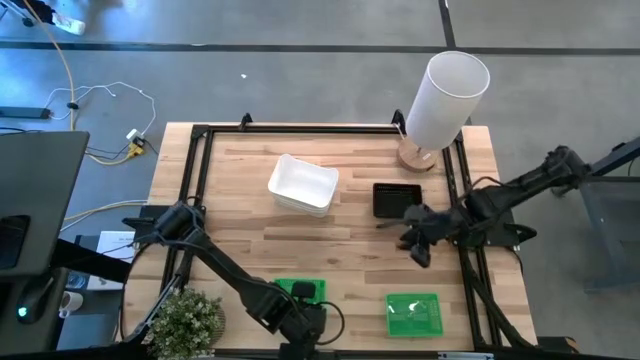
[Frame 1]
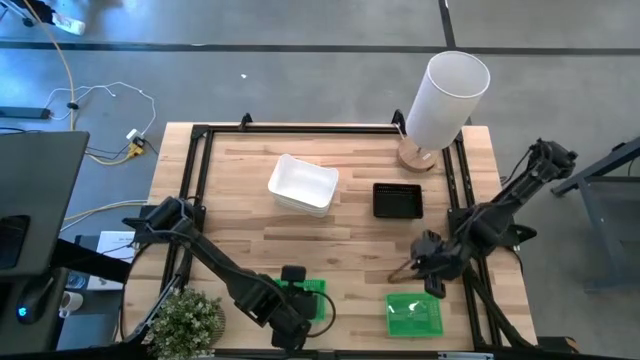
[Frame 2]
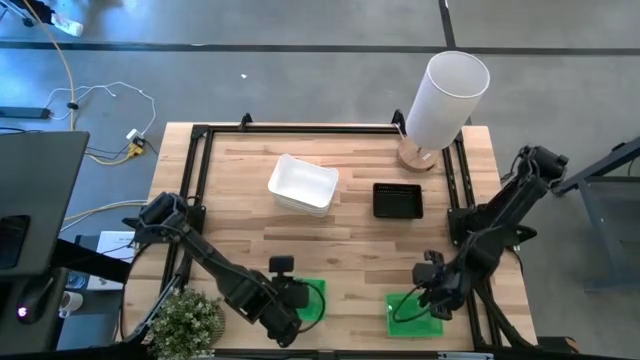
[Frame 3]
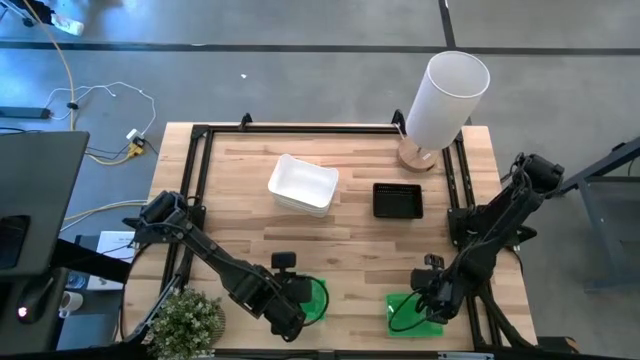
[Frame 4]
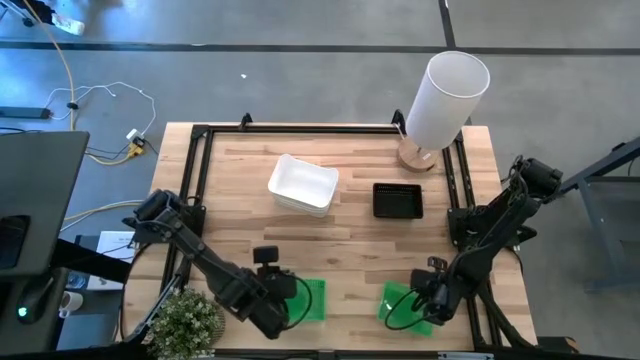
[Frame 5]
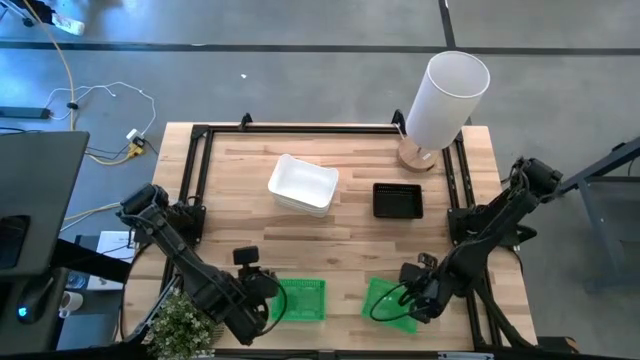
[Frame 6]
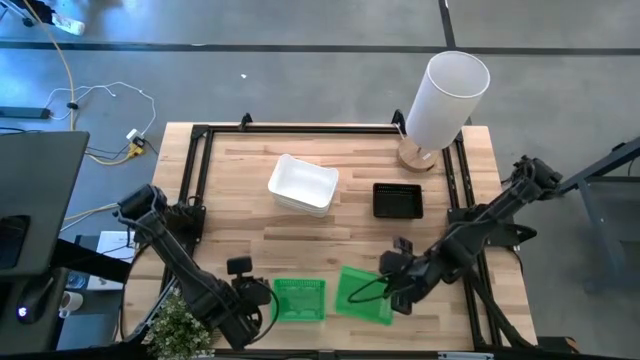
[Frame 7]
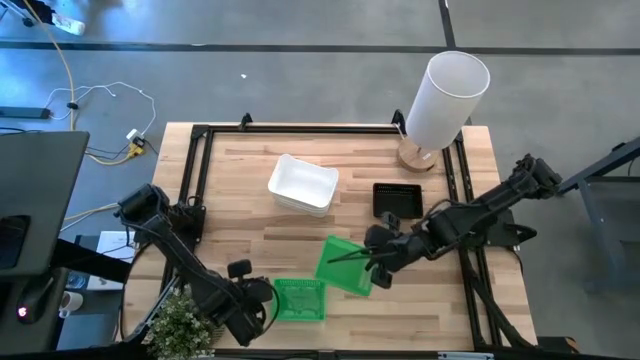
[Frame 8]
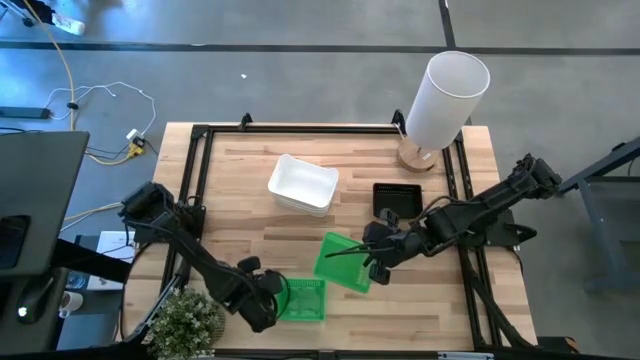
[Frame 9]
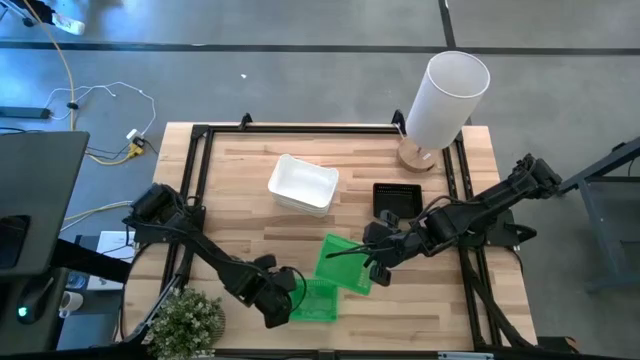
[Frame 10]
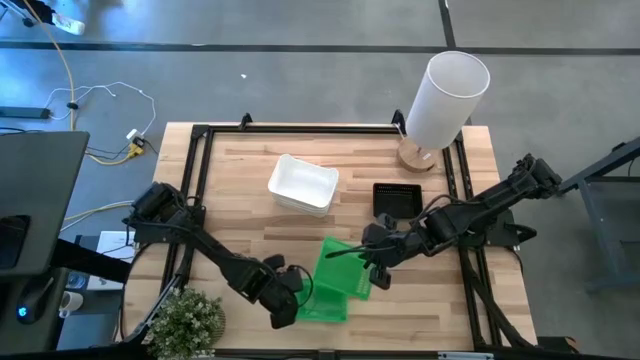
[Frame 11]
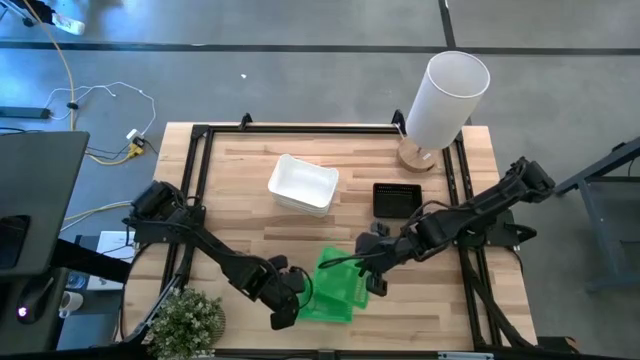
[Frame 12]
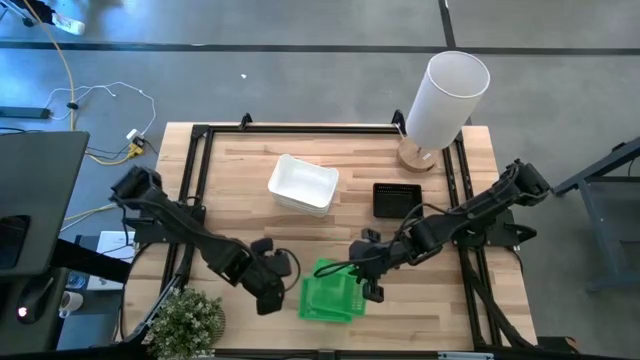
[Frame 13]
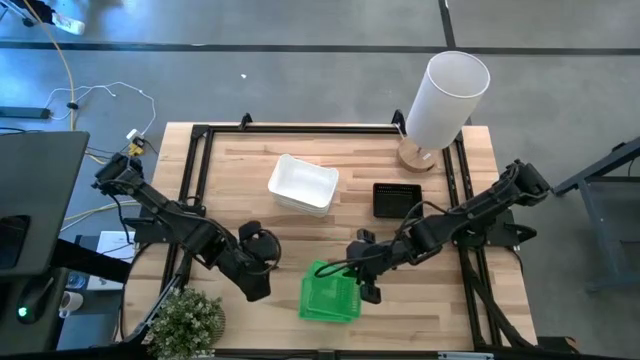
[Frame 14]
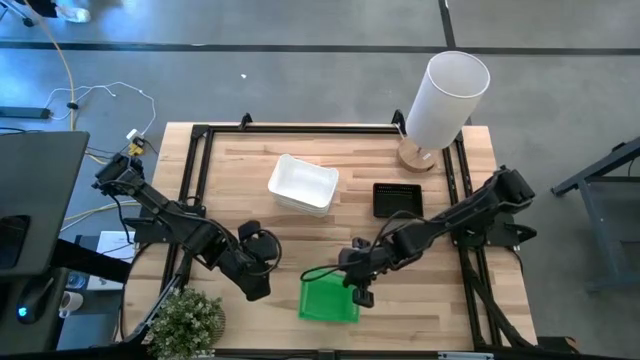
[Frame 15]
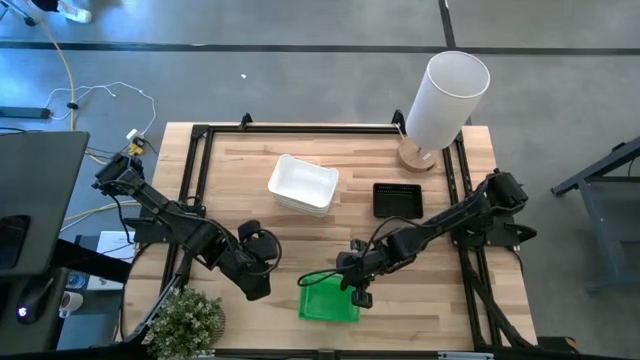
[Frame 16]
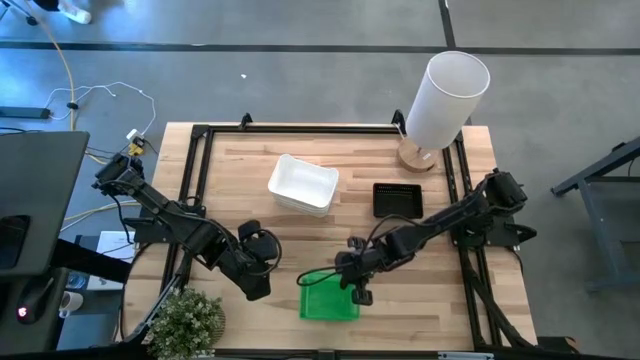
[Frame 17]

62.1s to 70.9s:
Stack the right green bin on top of the other green bins

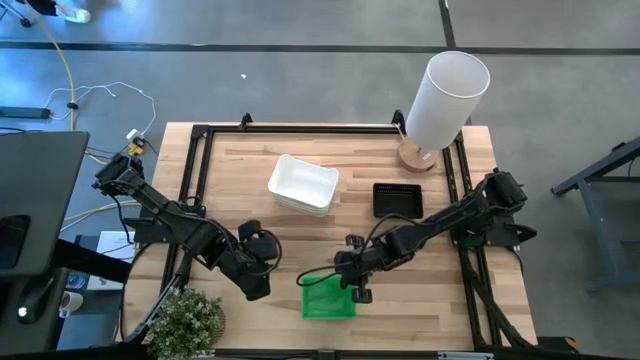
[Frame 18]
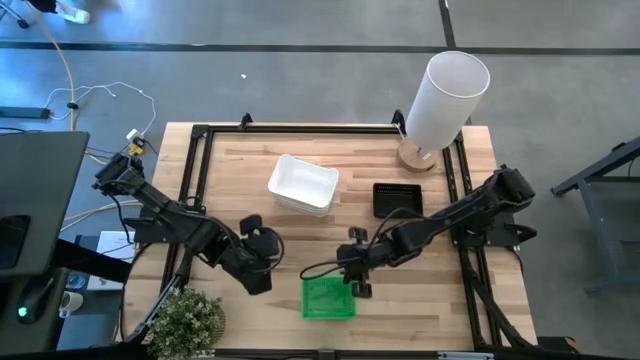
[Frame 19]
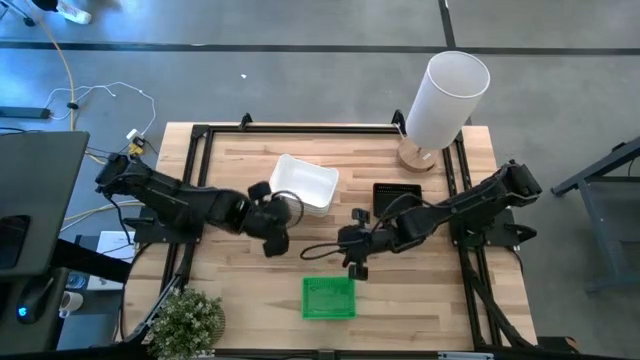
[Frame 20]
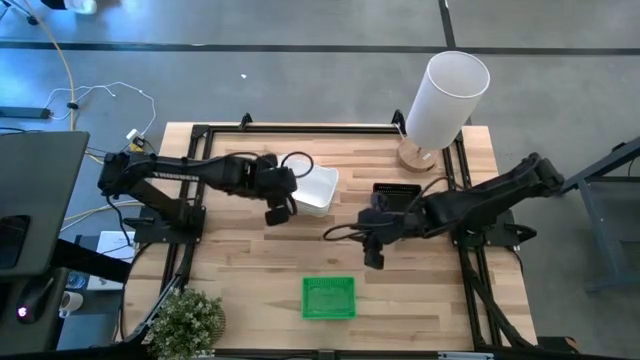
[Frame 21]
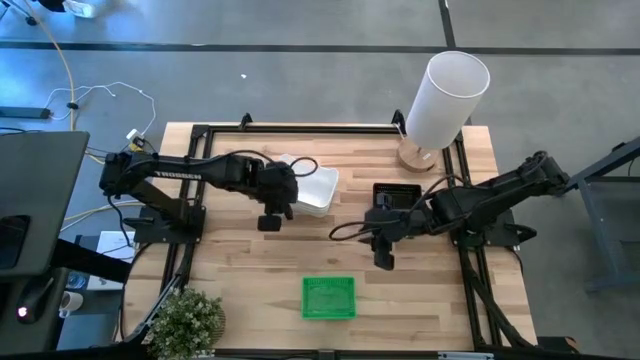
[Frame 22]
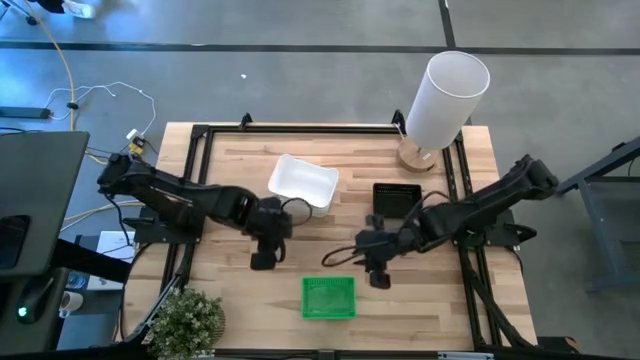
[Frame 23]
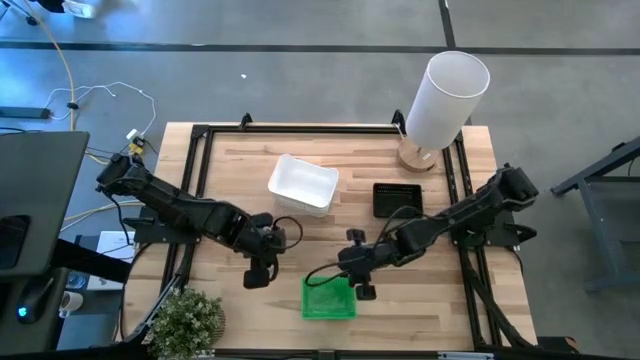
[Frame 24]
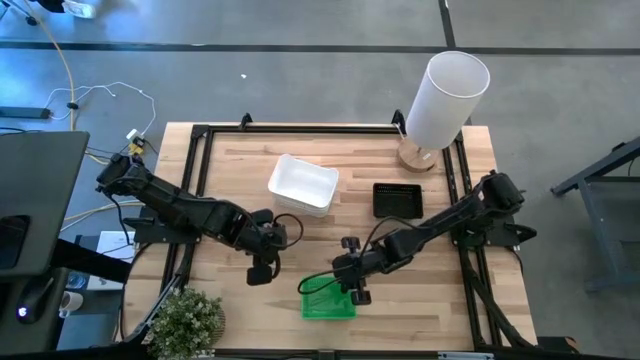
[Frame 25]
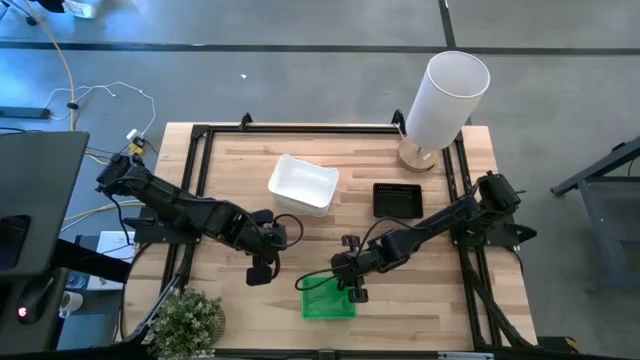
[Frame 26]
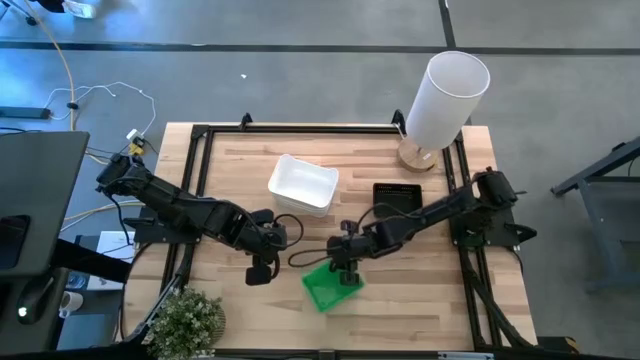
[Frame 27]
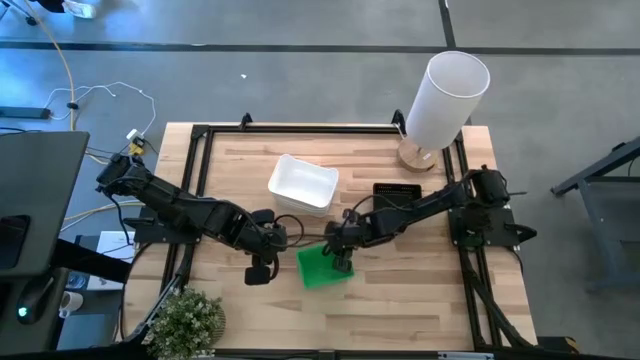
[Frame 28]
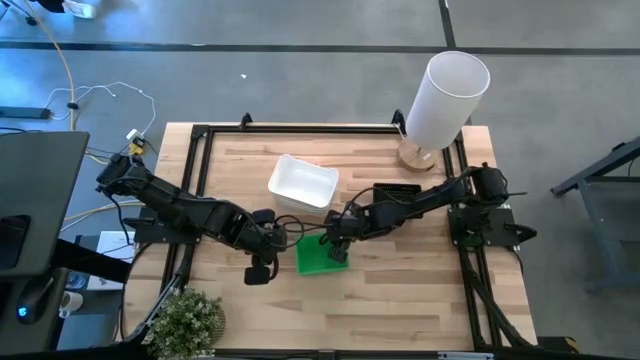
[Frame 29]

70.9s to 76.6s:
Adjust the stacked green bins

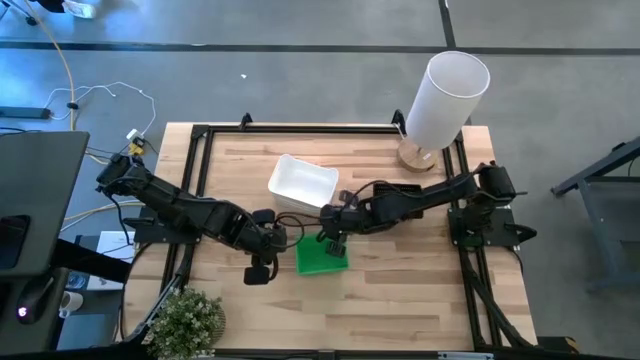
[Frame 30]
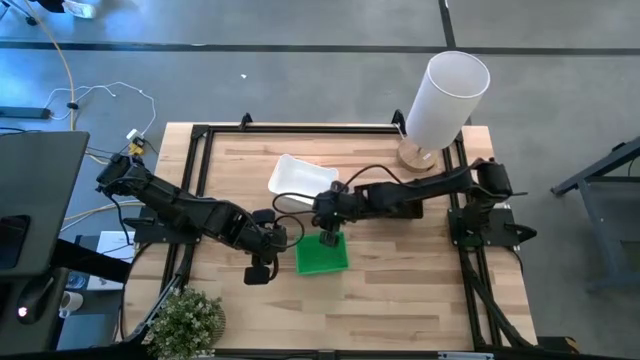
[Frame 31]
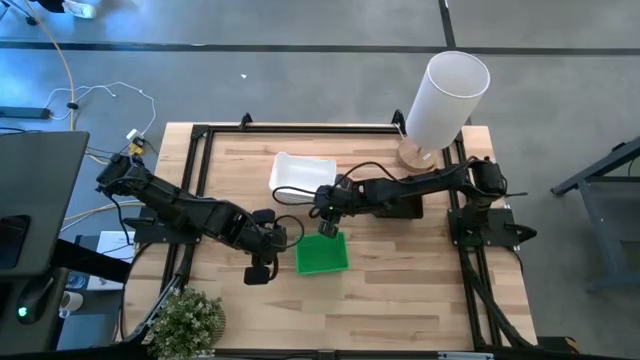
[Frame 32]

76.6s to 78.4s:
Adjust the stacked white bins

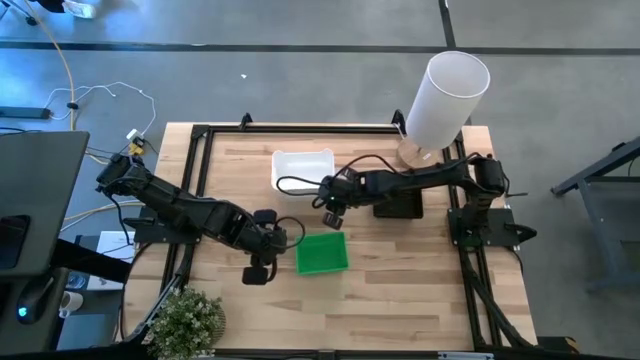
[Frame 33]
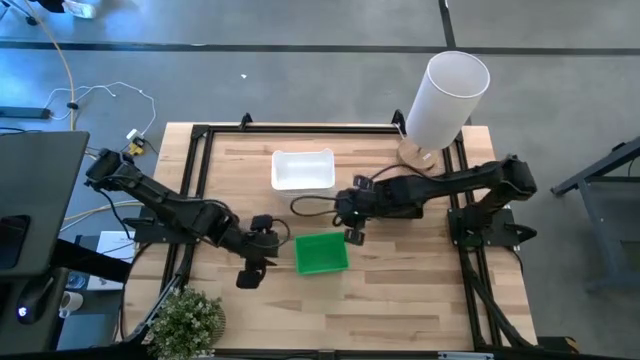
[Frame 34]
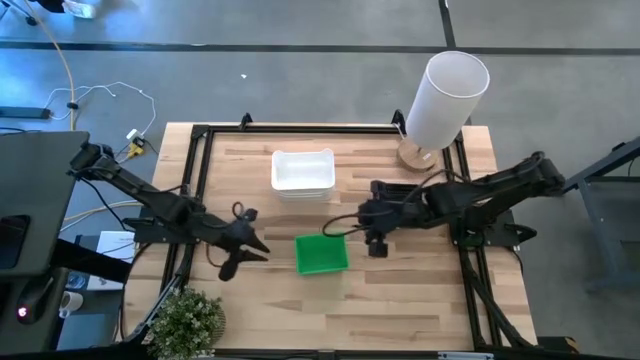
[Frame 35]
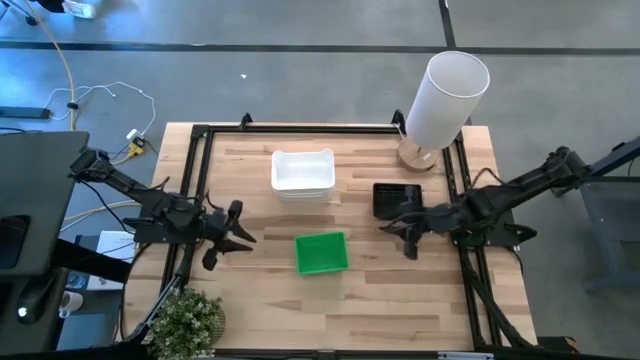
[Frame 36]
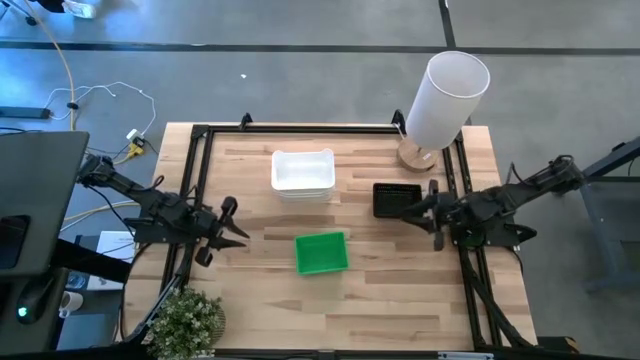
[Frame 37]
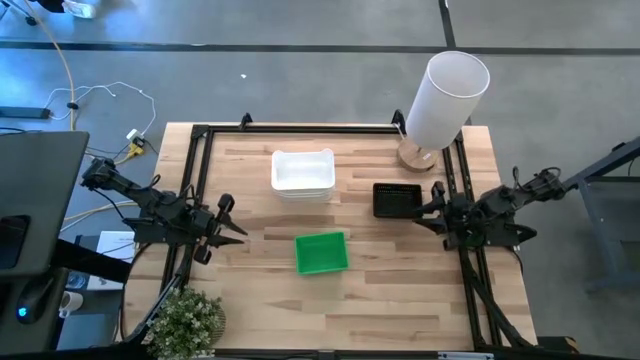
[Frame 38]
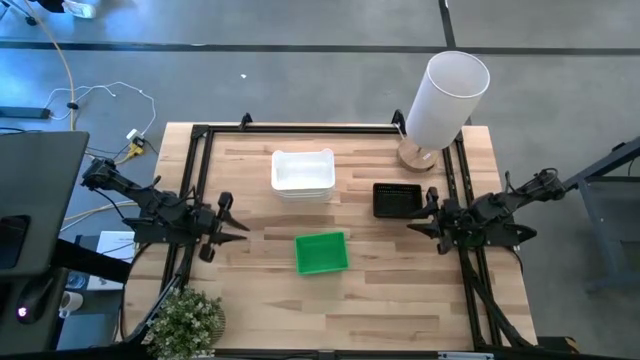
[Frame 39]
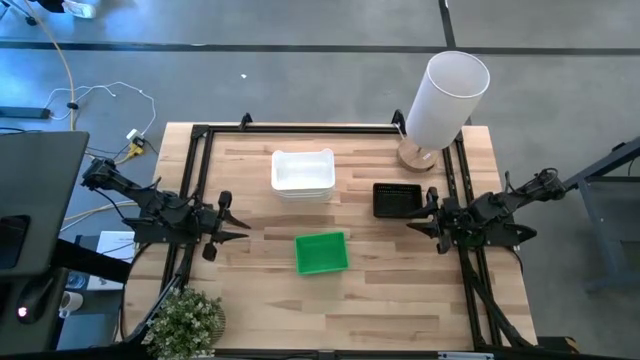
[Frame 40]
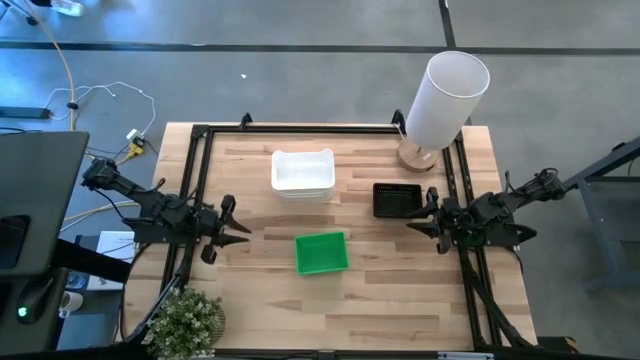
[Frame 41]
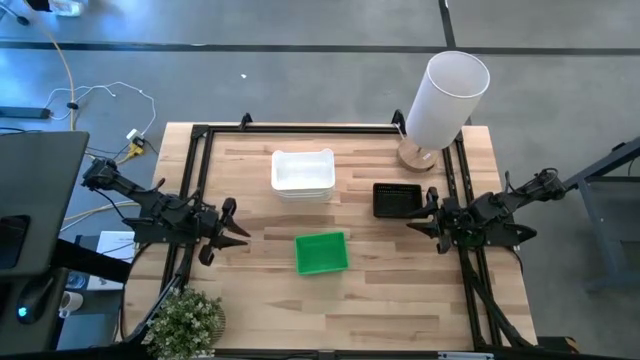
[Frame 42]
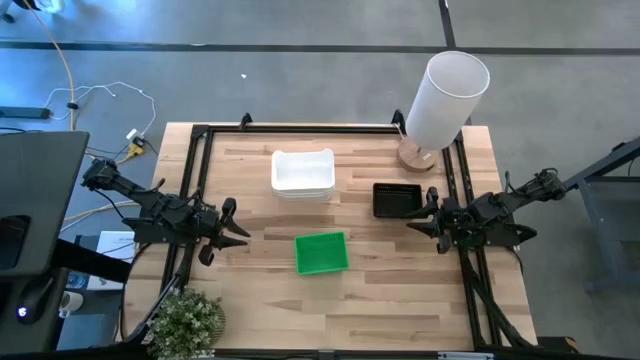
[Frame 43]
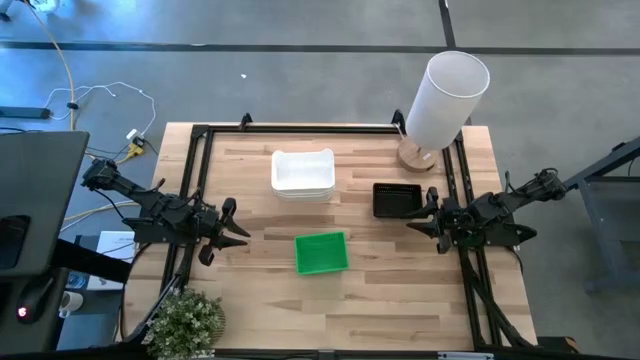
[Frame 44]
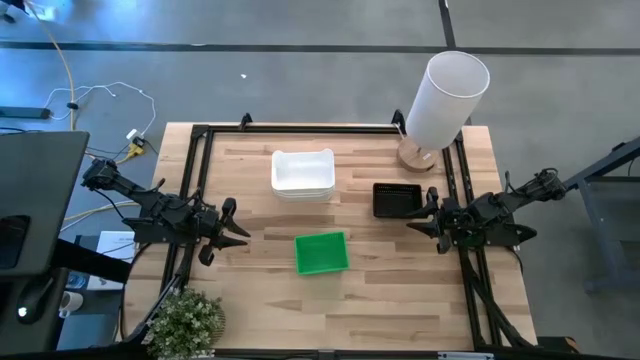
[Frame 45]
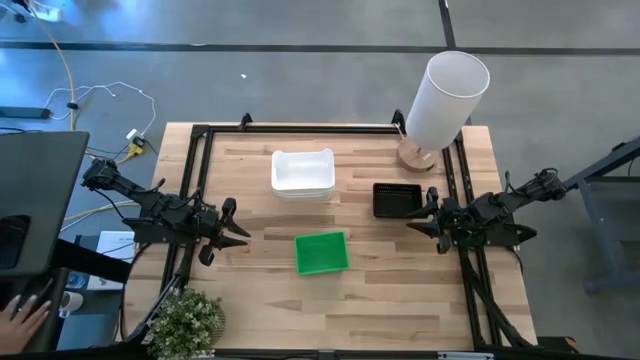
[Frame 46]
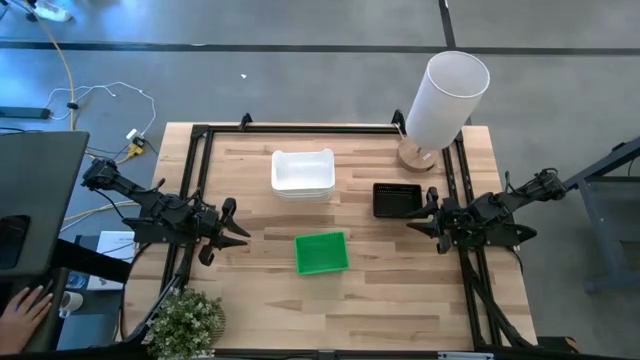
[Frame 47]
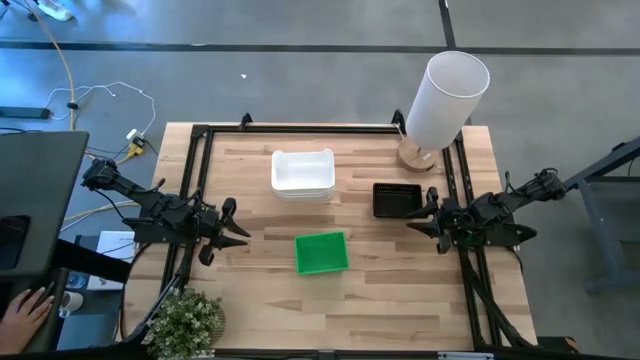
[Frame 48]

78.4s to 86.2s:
Return to Home Position
